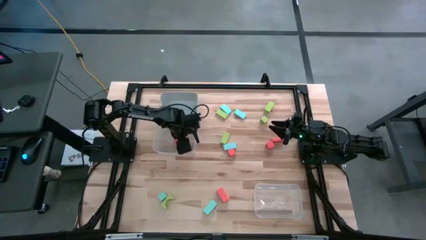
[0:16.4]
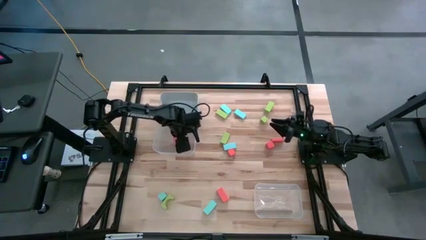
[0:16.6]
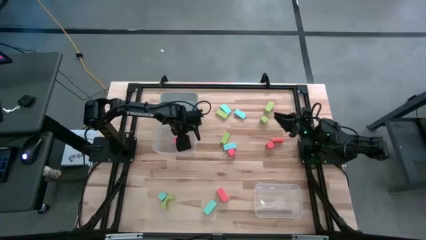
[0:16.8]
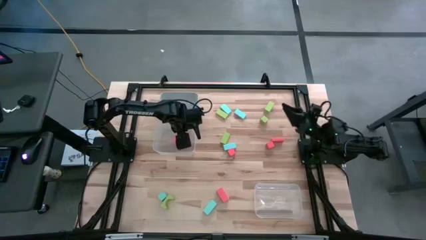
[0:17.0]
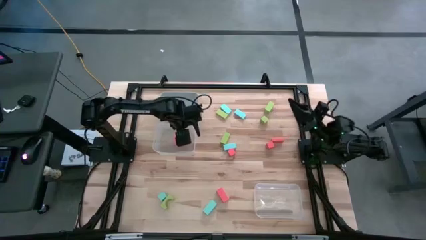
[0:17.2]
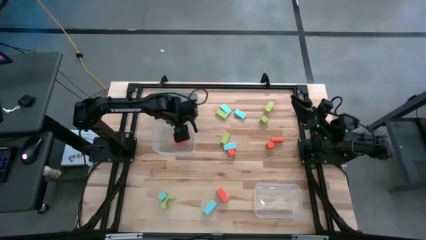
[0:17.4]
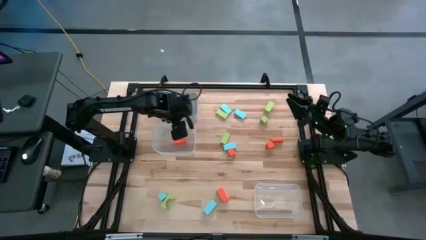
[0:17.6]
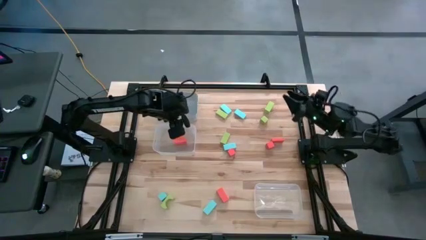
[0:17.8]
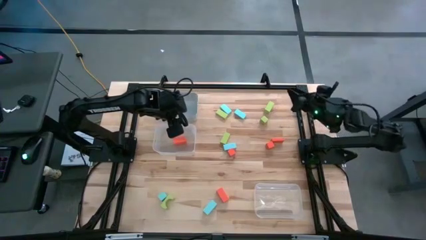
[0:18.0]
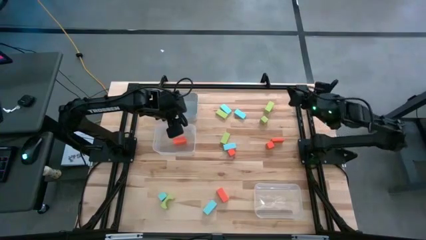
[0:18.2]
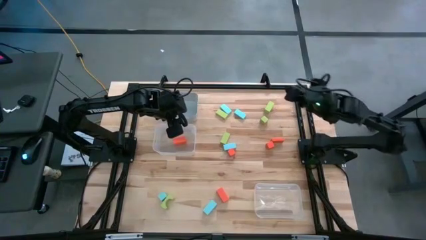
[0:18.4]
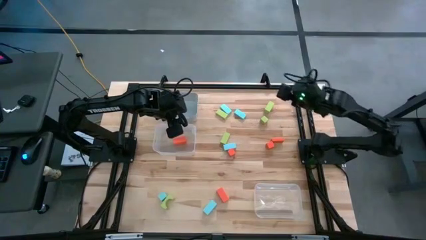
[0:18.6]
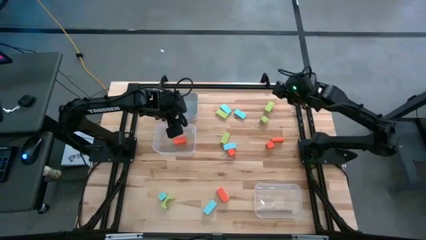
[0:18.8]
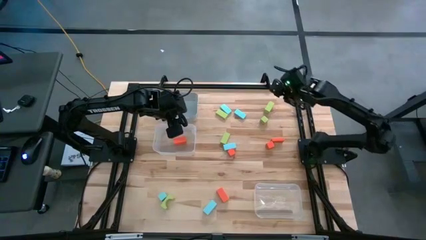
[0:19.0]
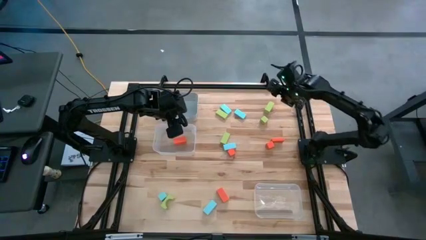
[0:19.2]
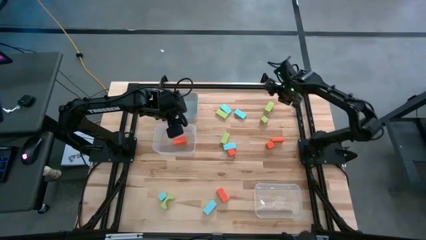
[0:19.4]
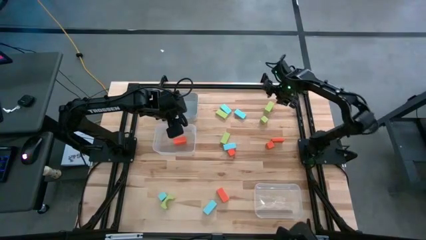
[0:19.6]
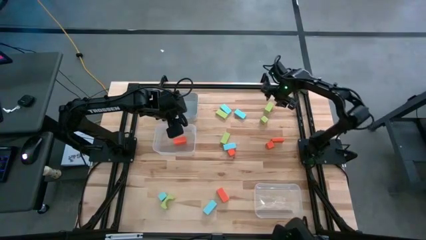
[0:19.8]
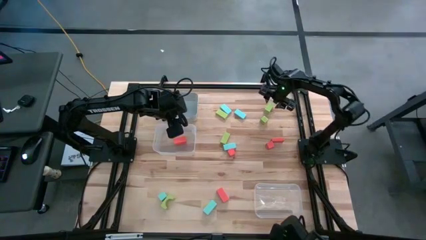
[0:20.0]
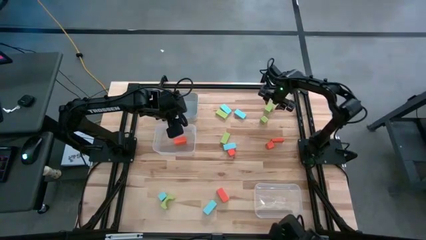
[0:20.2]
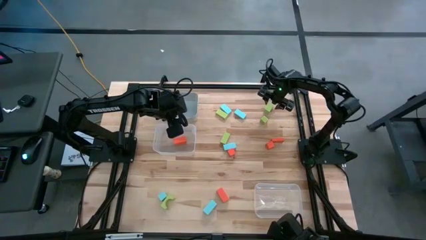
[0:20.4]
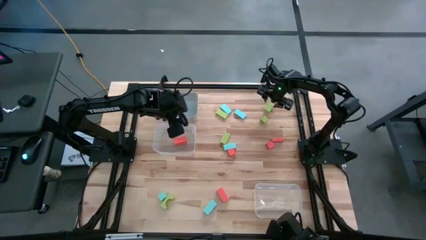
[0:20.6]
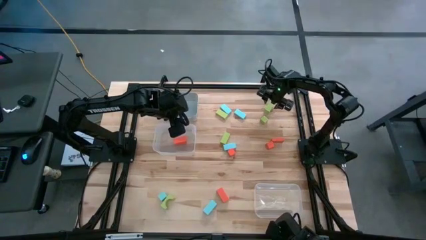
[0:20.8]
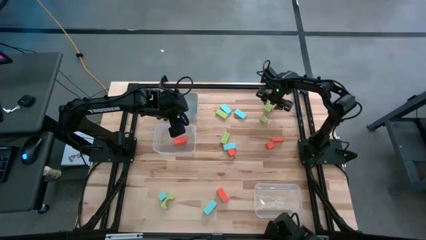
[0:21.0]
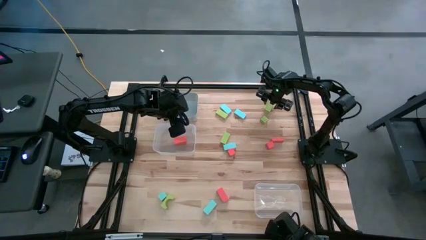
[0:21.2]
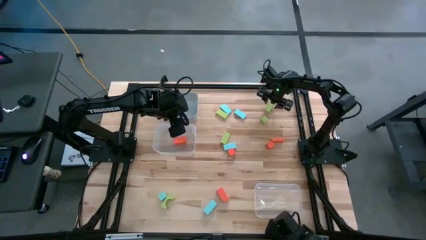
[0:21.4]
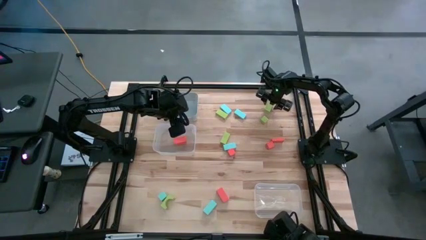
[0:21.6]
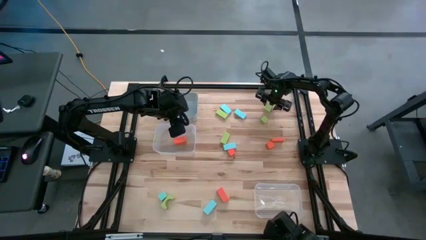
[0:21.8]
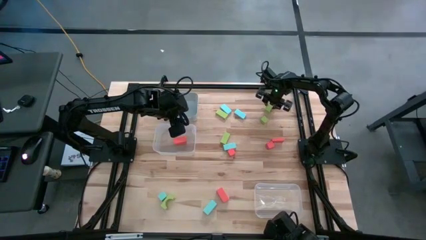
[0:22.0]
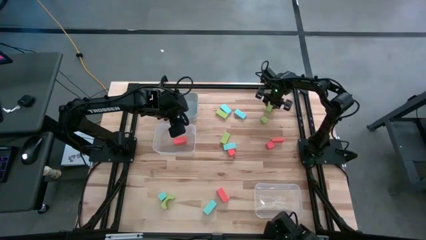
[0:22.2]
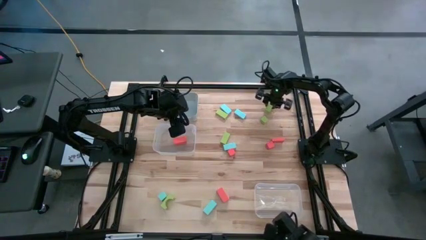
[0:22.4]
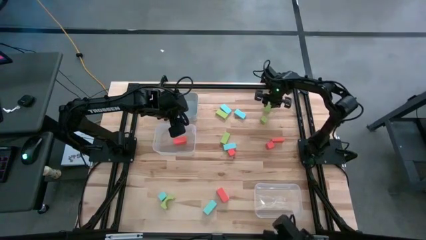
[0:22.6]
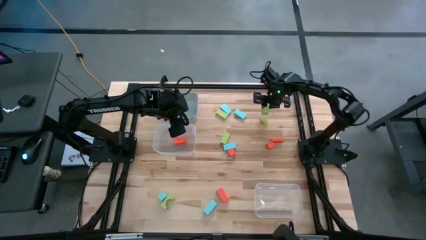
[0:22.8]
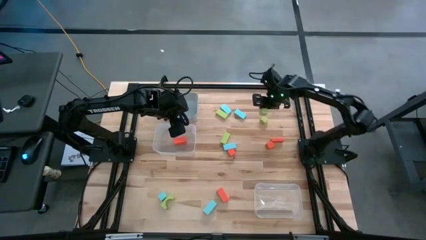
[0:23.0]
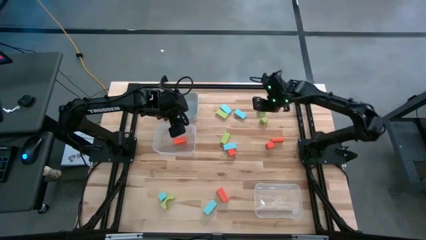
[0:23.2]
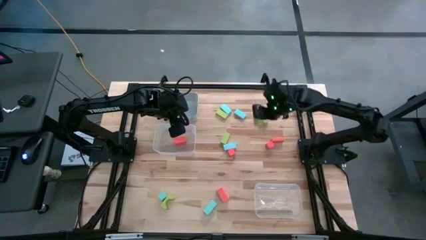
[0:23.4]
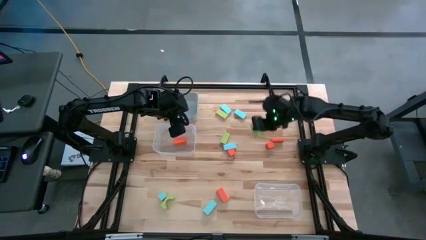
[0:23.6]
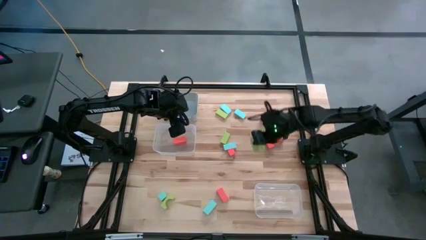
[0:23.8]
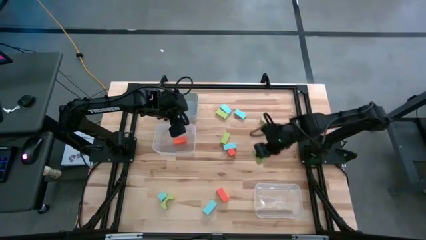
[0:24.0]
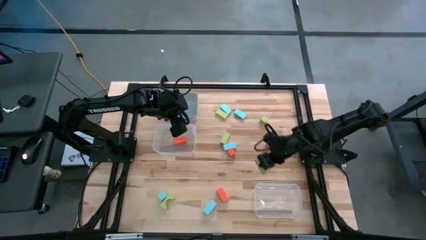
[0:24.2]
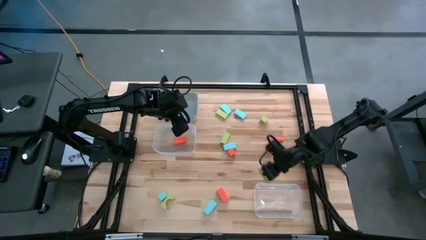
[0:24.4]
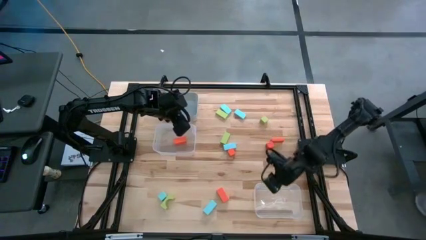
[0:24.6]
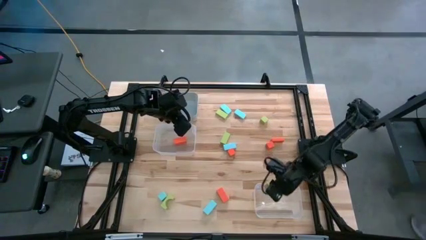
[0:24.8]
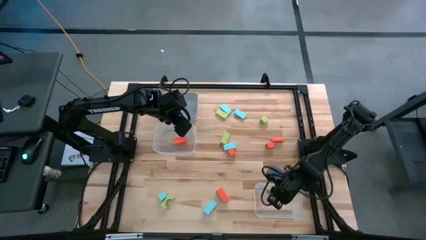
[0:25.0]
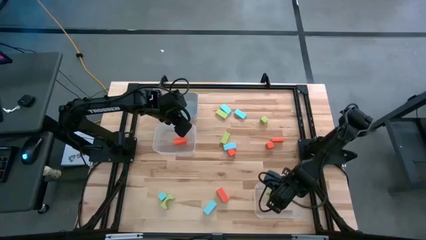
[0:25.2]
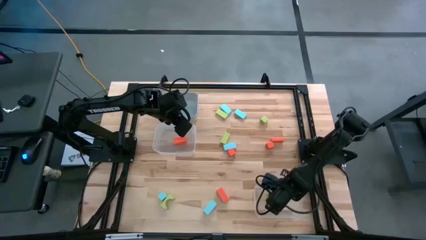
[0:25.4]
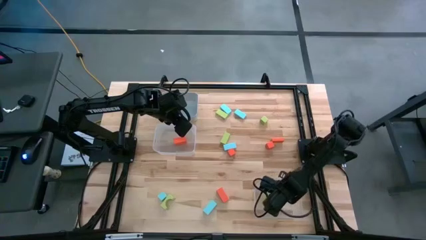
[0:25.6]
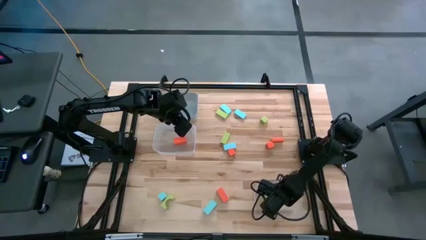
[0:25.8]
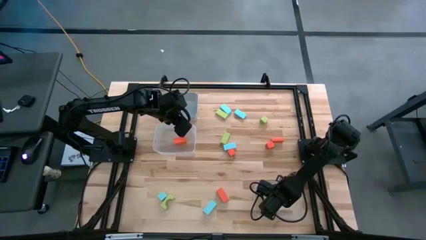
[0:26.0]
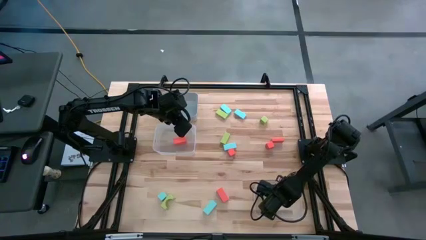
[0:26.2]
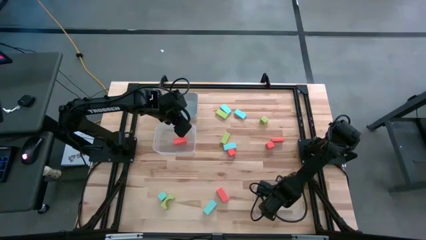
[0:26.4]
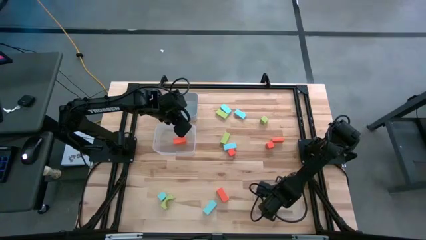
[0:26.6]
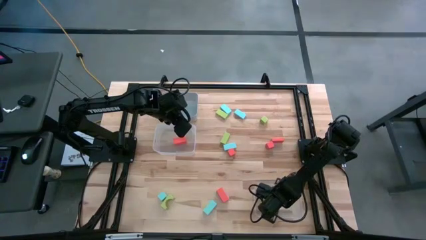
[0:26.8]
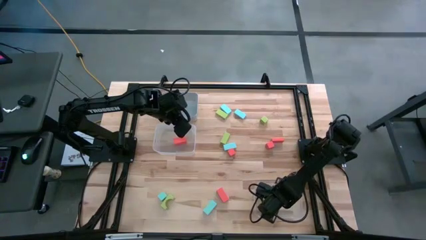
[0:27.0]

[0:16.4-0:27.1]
Task: Sort & place blocks by color
Put the green block into the bottom transparent bin

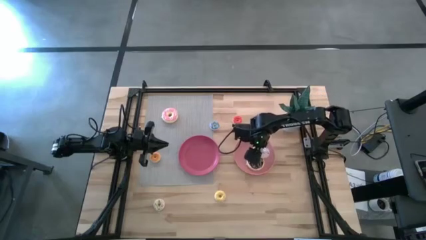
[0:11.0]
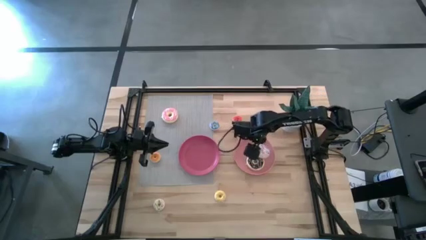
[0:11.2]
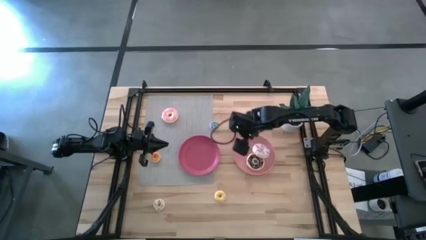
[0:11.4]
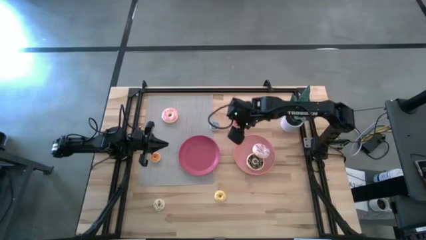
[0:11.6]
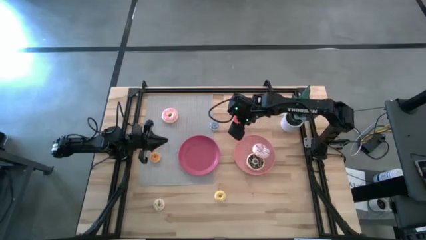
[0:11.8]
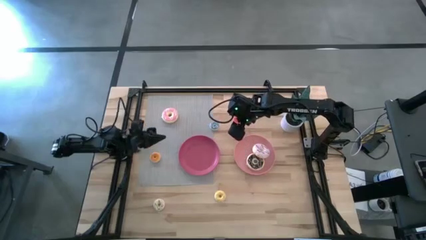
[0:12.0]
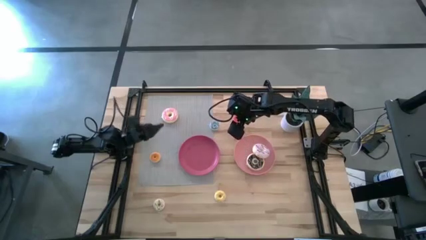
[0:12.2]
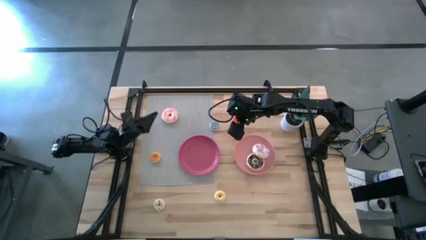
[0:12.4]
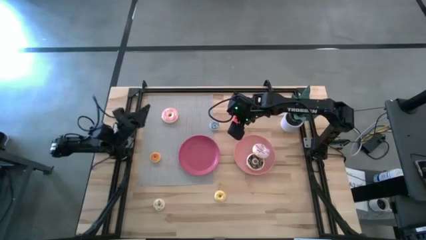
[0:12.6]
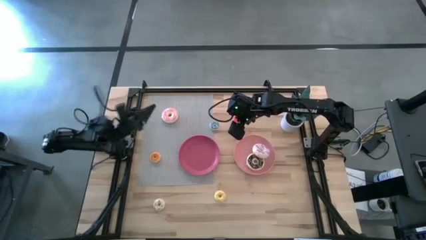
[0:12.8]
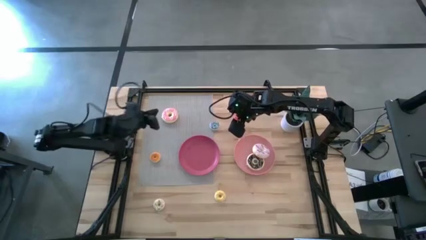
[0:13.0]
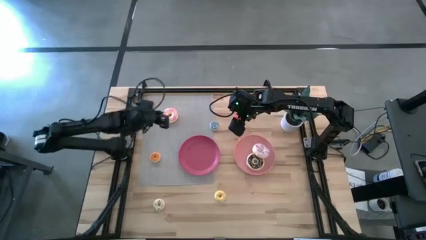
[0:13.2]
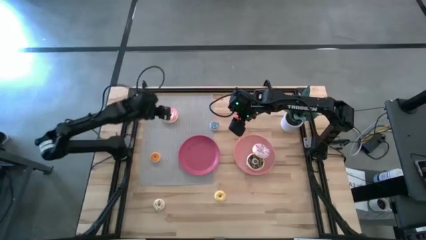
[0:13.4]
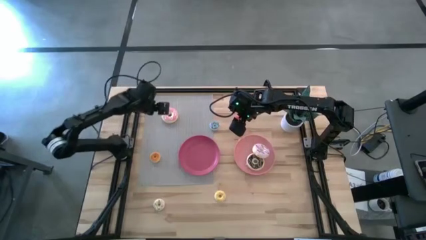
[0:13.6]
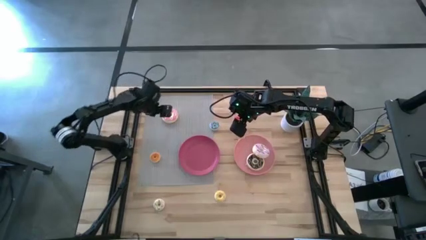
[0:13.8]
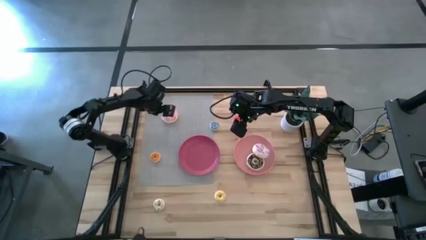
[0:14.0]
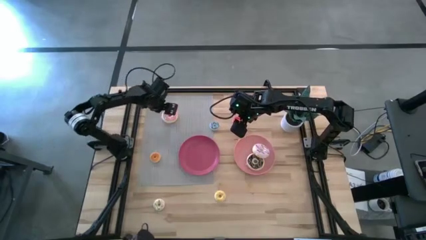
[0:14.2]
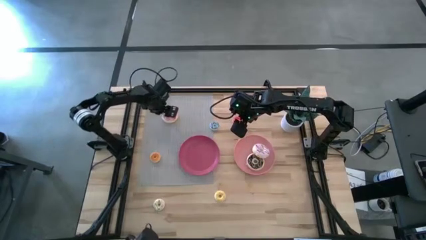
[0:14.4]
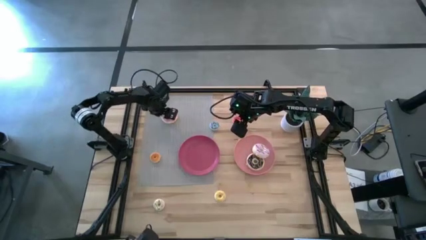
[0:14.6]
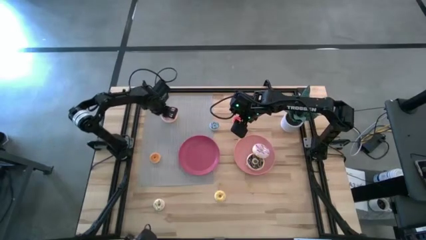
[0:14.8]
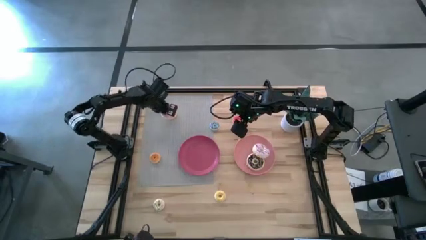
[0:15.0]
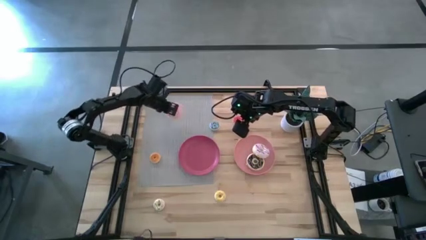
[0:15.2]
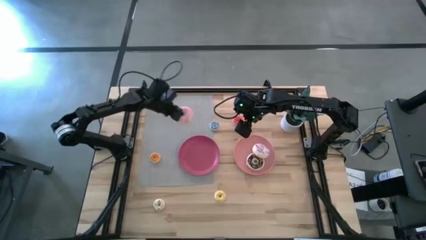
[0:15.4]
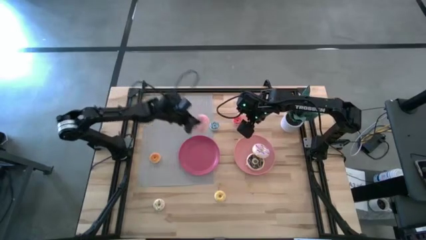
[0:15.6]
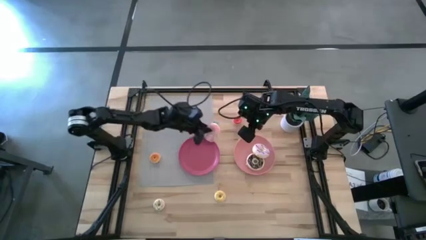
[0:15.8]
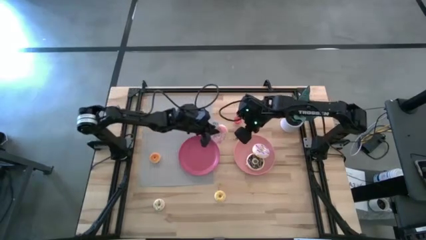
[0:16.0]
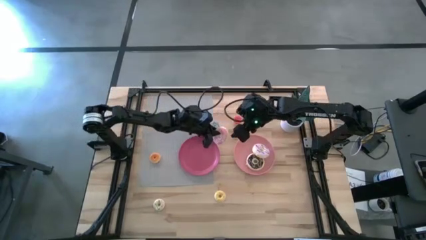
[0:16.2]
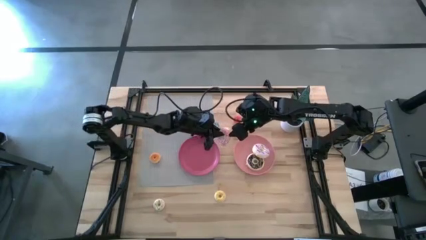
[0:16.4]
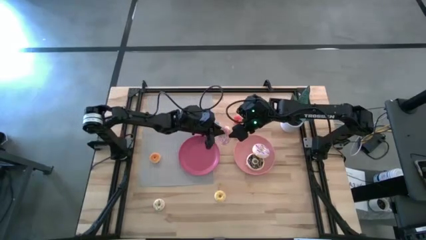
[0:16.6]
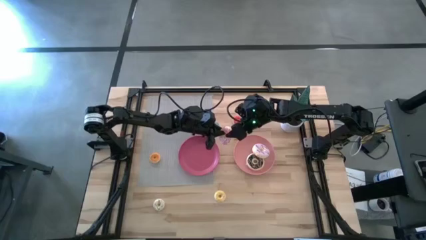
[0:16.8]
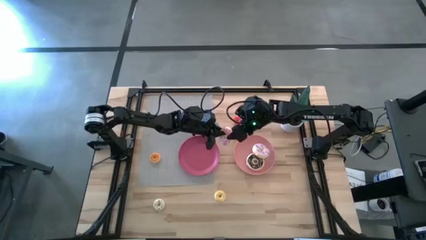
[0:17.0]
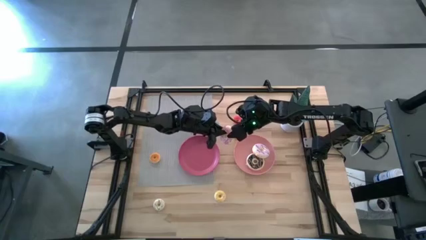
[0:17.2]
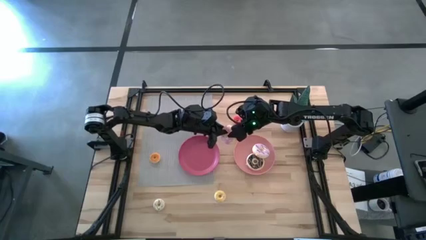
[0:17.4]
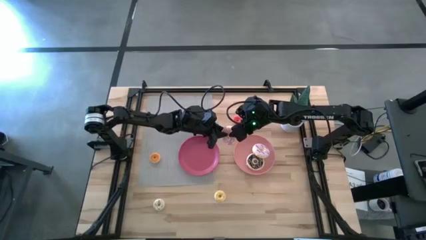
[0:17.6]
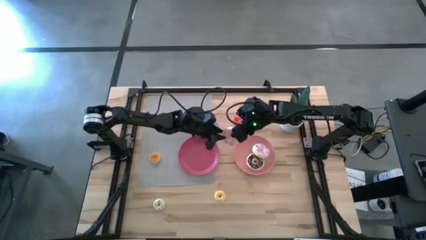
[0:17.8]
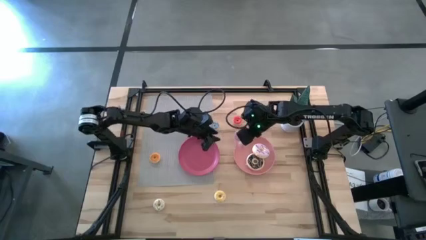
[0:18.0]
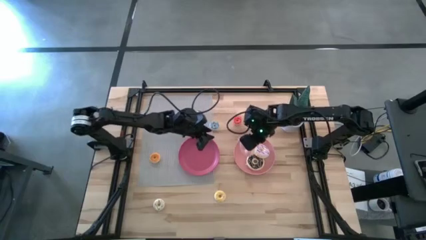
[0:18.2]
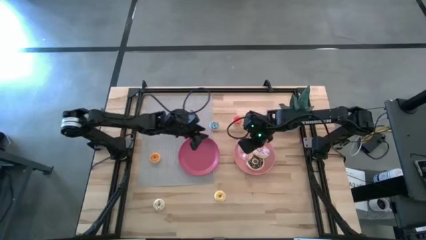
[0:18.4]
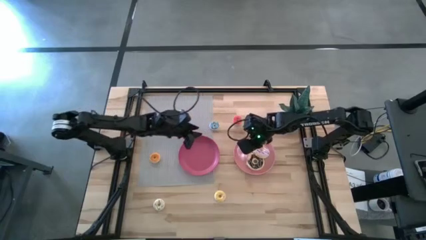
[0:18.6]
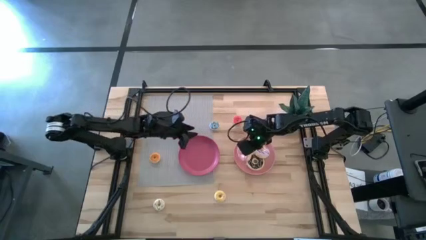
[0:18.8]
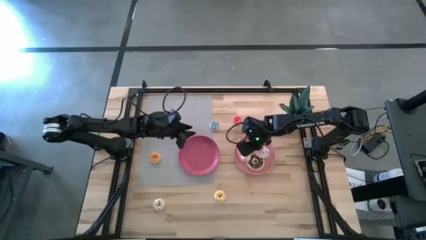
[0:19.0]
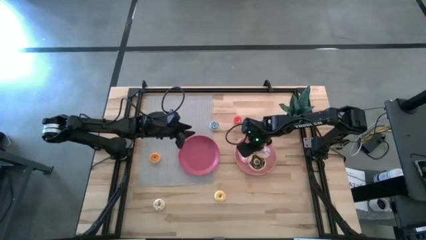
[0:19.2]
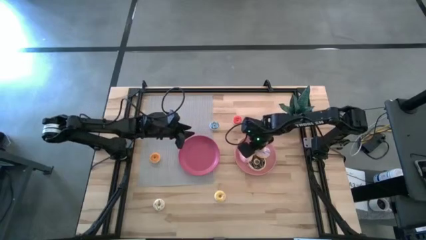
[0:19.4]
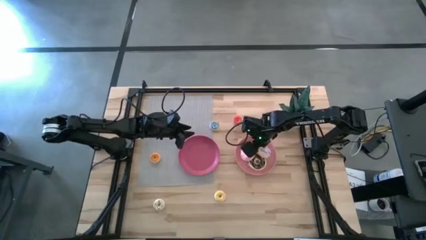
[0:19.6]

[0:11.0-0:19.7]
Task: Pick & Place donuts
Put the big pink doughnut into the light pink plate
